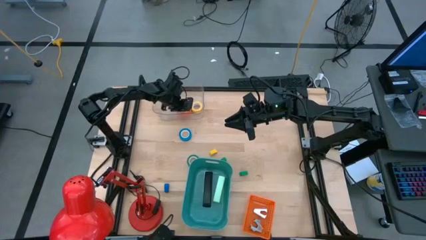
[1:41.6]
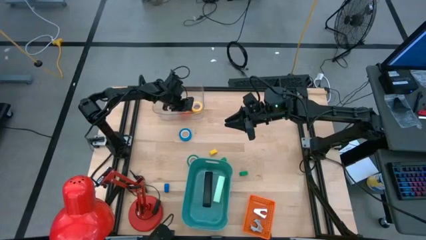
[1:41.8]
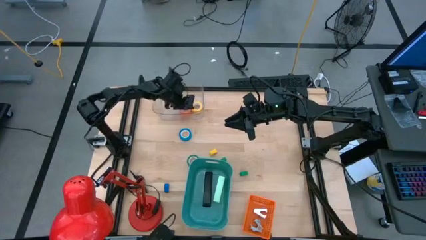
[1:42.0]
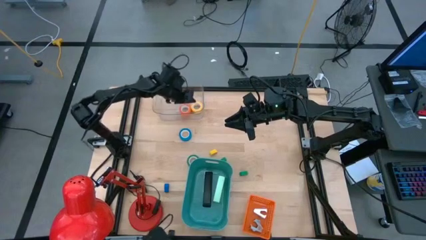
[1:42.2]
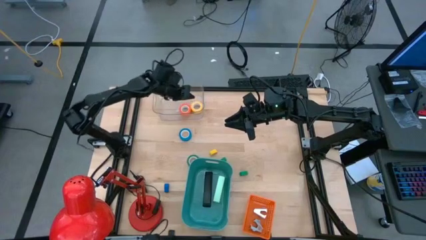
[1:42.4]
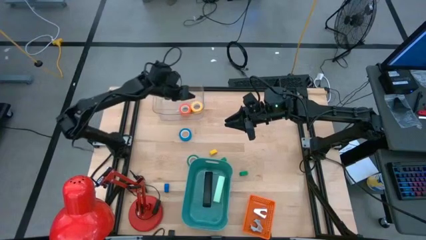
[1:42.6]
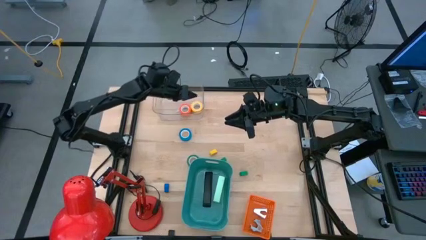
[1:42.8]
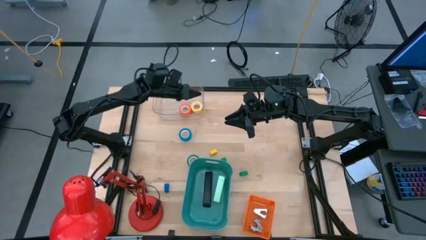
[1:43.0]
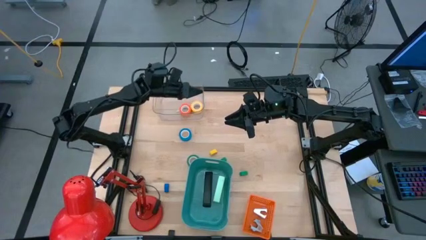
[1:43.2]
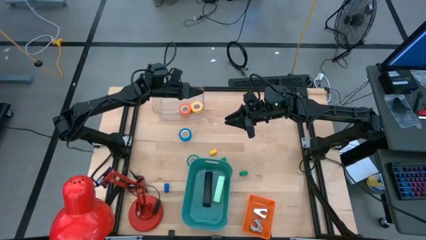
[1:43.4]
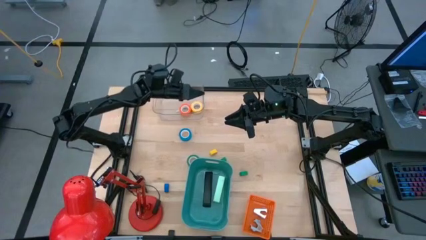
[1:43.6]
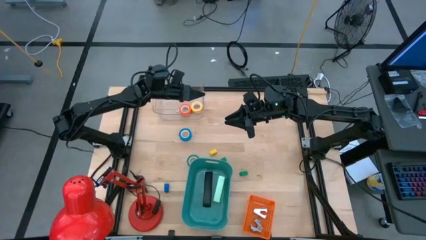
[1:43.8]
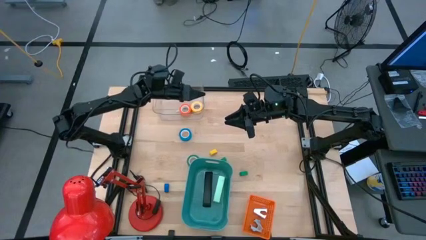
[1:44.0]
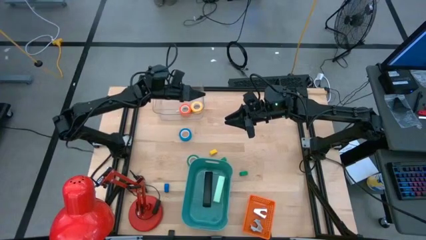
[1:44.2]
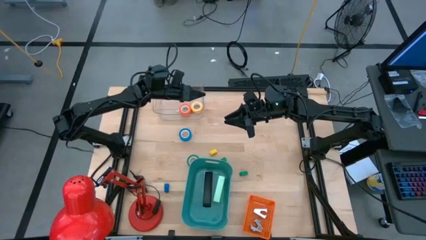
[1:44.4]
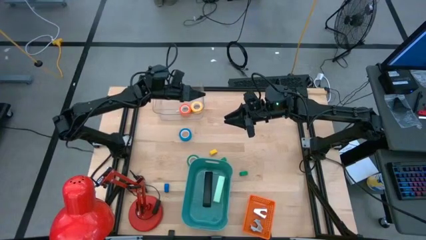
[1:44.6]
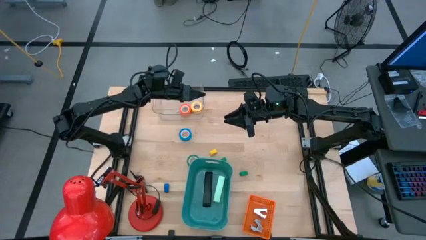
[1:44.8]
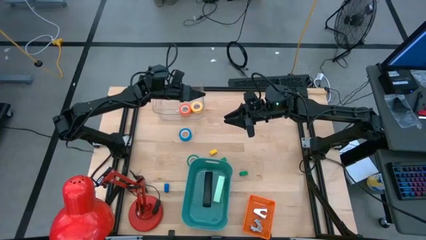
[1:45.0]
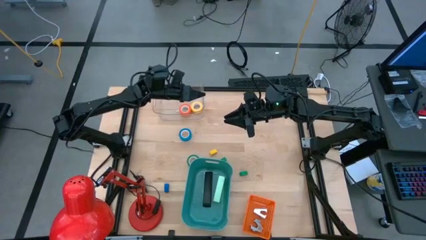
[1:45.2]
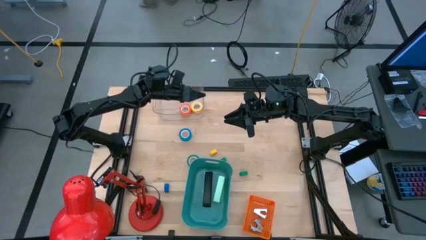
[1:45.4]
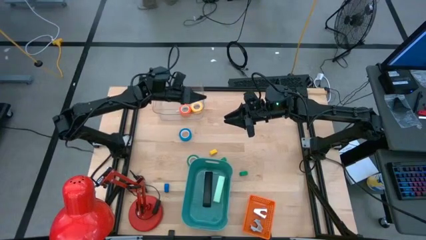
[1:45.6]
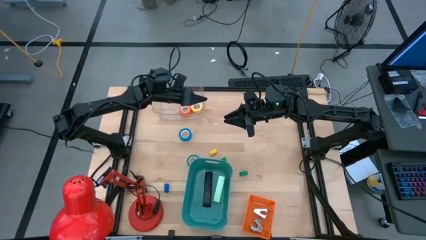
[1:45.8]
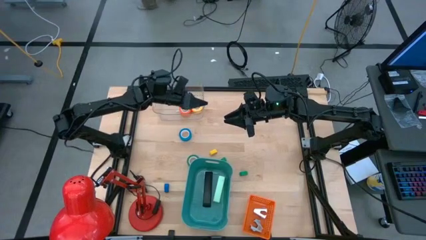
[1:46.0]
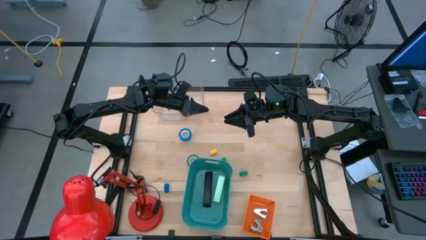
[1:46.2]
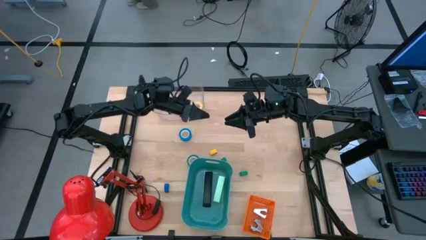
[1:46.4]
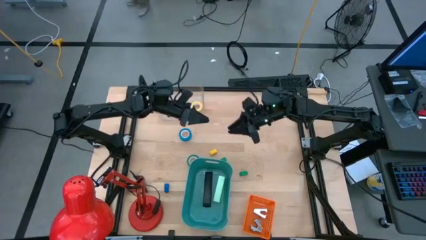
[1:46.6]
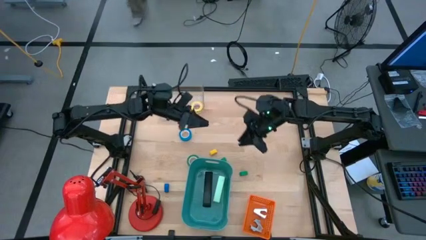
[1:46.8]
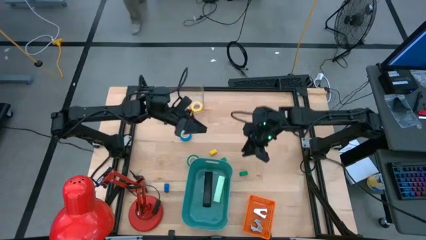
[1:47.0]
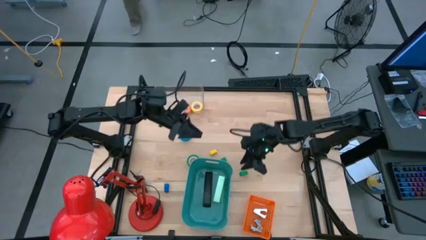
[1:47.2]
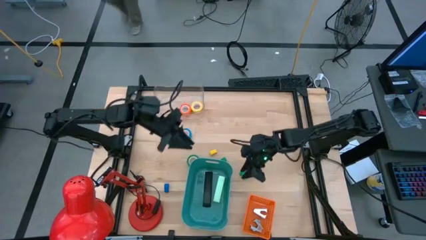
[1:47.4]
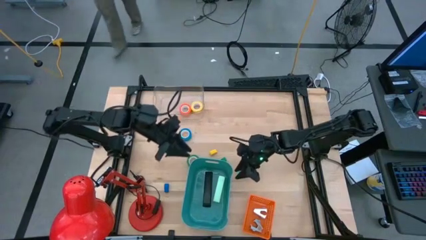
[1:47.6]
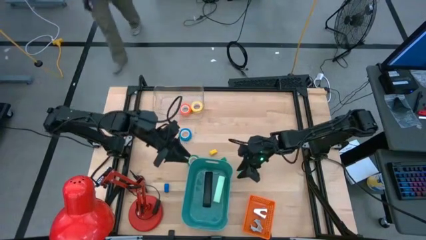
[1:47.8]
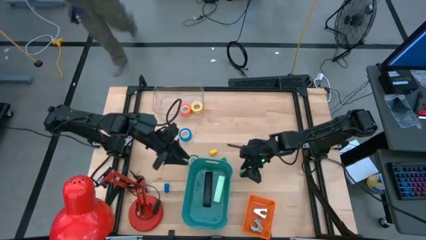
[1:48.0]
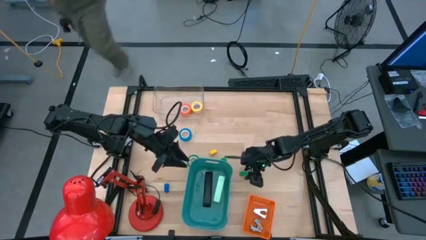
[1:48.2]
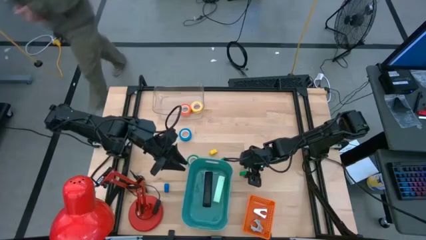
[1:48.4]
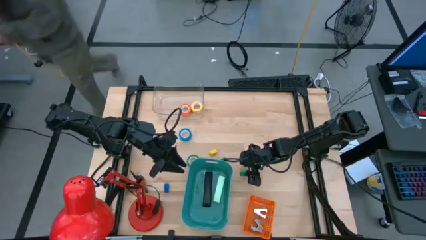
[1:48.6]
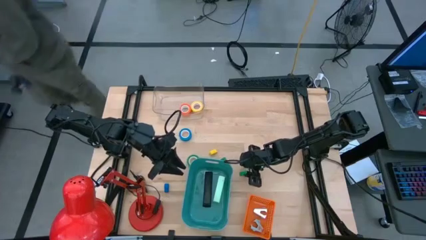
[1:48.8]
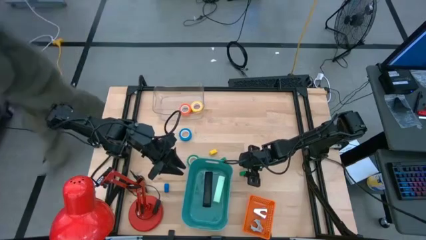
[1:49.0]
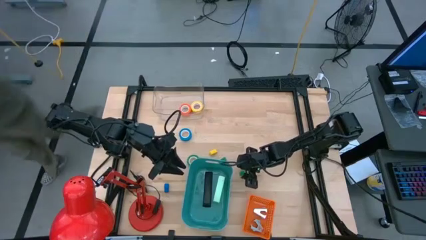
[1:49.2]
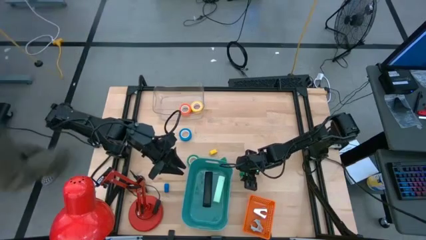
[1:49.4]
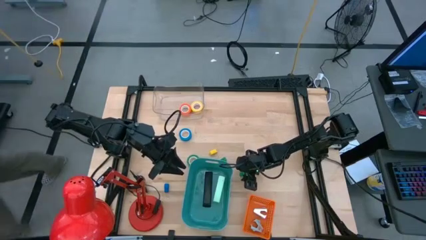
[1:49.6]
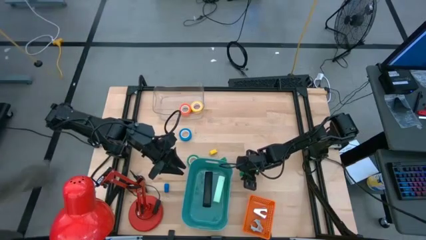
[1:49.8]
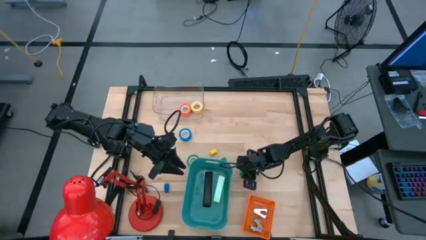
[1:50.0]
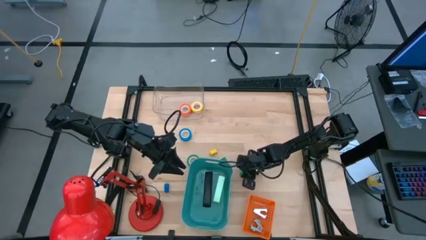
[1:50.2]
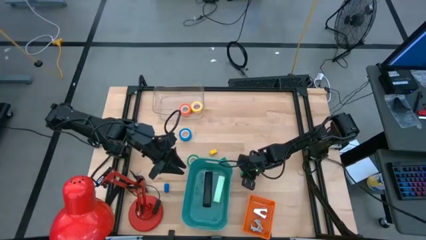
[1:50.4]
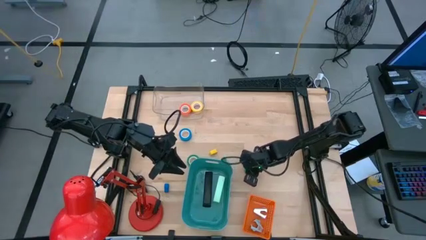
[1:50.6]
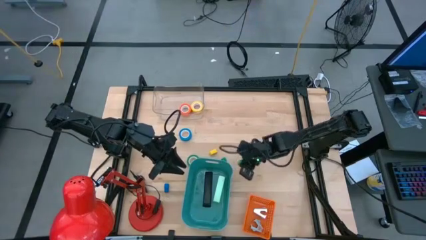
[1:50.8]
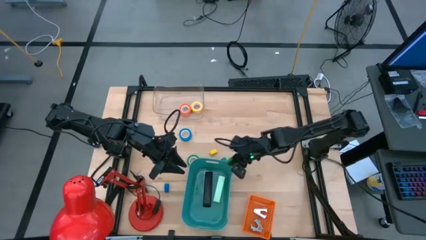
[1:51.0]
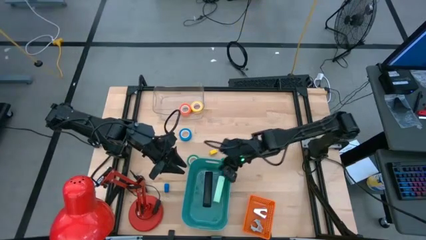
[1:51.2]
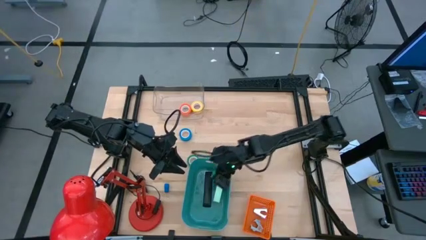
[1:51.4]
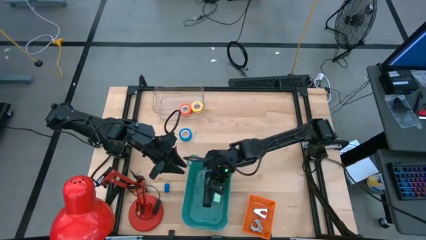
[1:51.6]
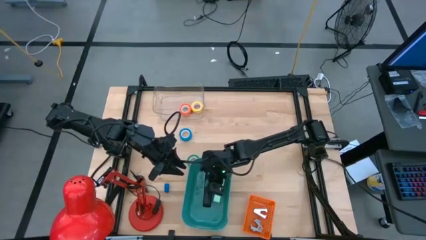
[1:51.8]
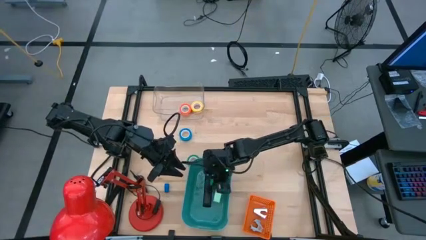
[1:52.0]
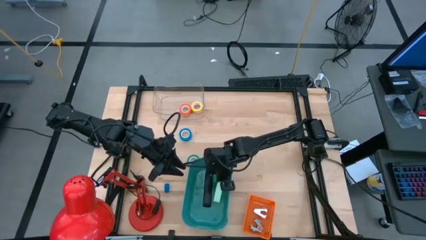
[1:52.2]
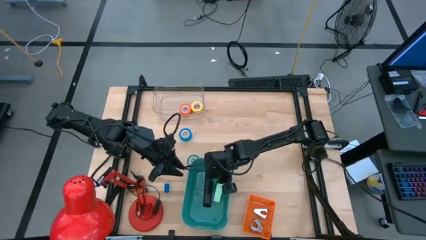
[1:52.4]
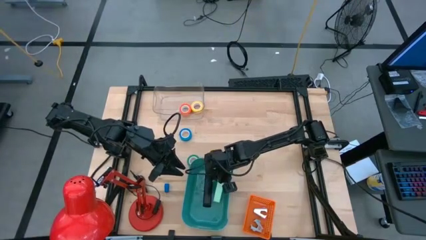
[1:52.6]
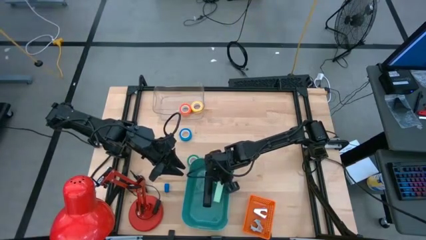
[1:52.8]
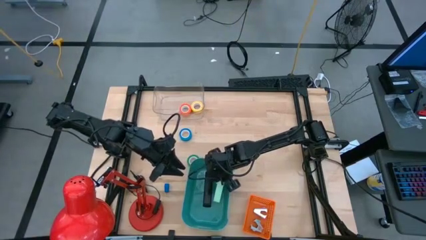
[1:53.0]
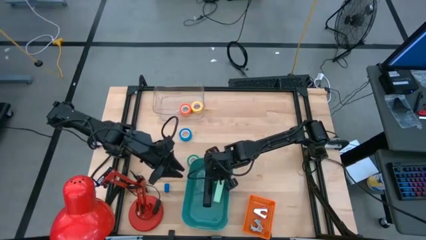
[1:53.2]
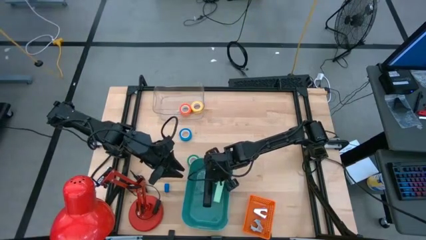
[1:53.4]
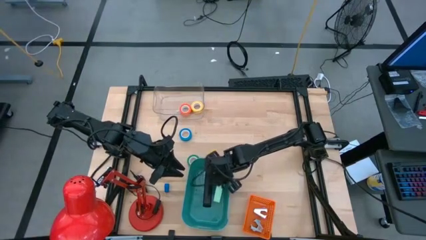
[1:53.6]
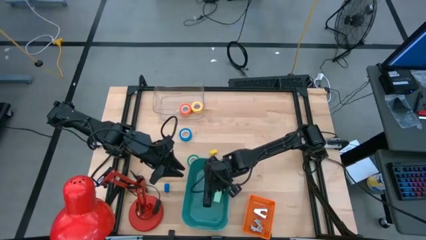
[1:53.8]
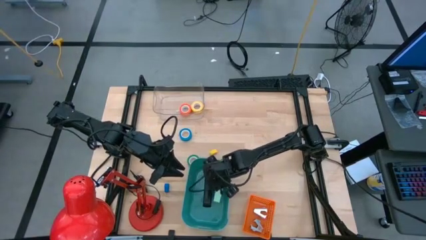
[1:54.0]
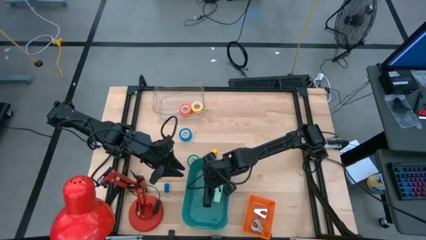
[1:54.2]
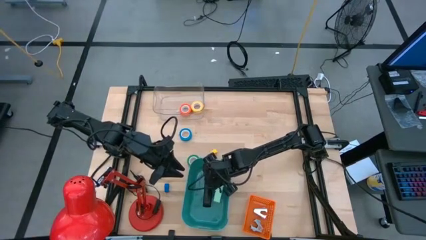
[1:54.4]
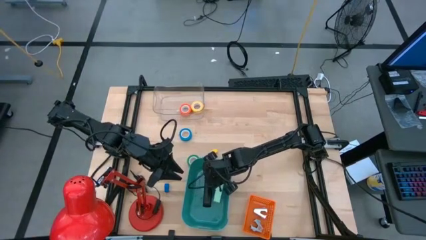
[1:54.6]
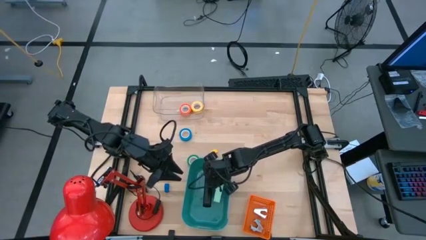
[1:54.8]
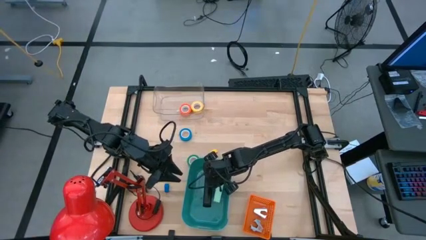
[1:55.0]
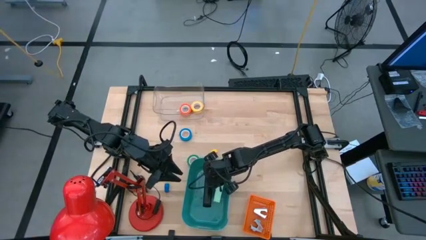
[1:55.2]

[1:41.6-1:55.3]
Task: Pick and place Stapler, Stapler remover, tape
Put the right green stapler into the green bin
